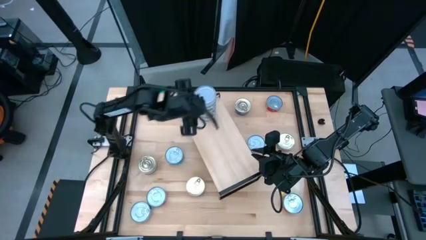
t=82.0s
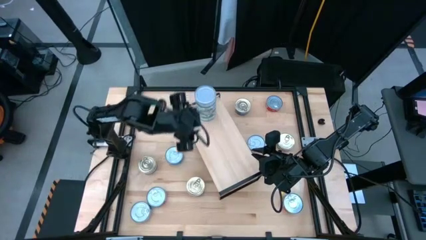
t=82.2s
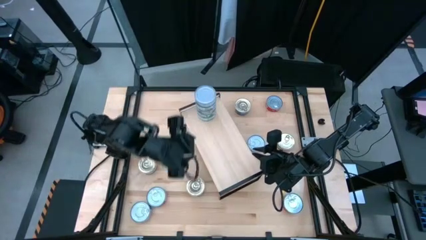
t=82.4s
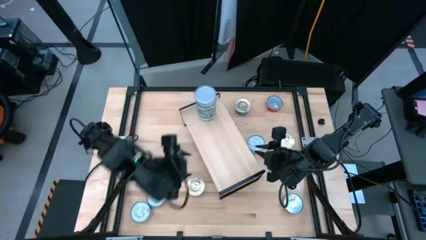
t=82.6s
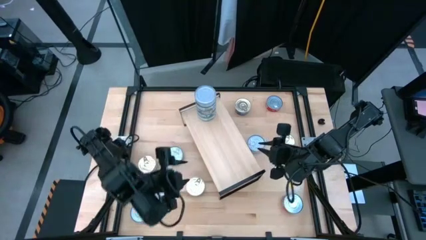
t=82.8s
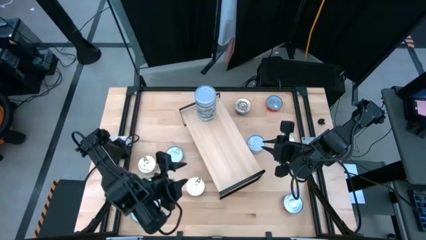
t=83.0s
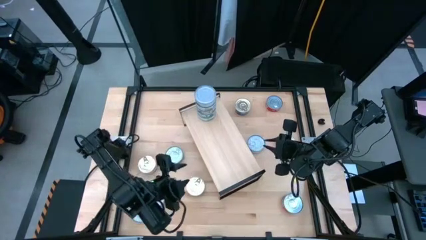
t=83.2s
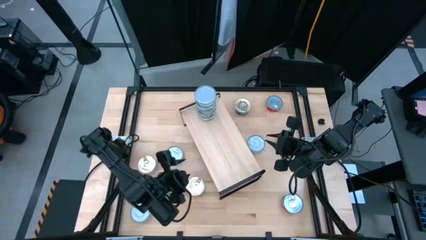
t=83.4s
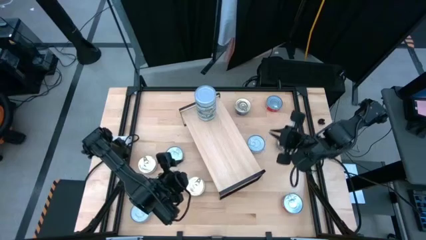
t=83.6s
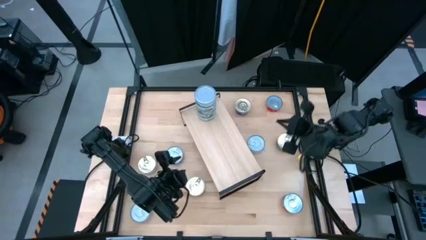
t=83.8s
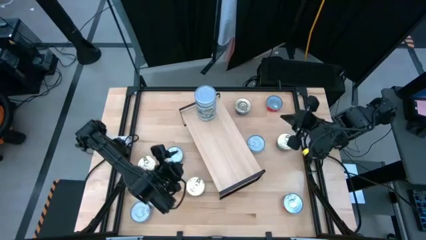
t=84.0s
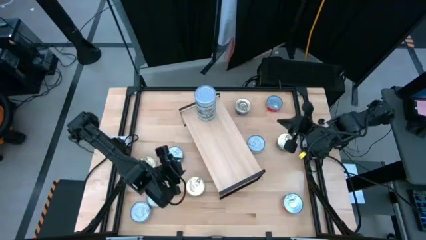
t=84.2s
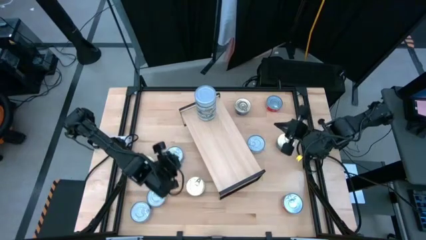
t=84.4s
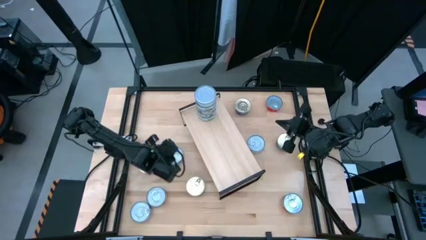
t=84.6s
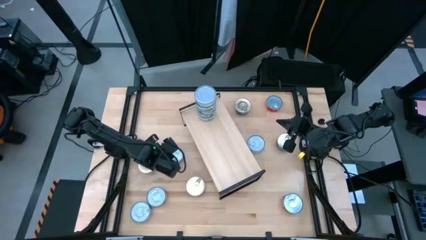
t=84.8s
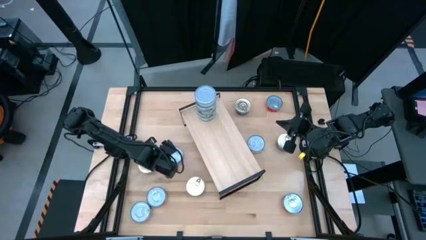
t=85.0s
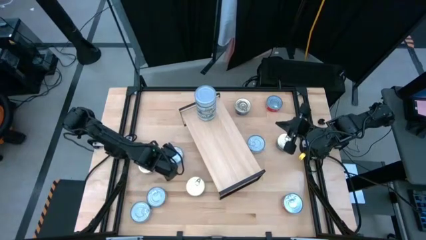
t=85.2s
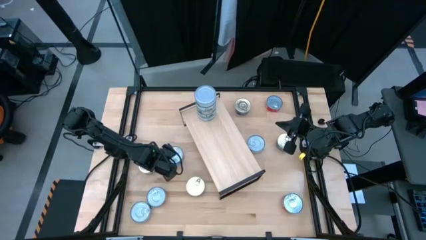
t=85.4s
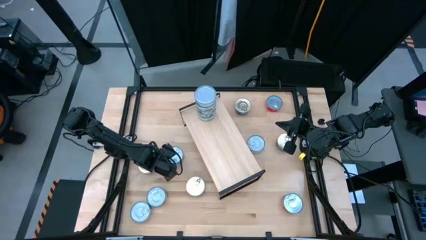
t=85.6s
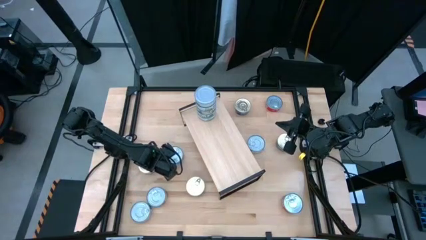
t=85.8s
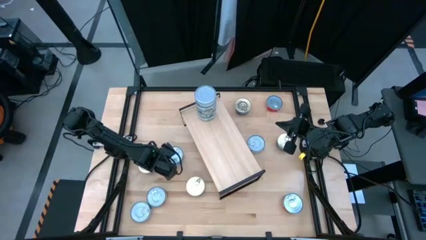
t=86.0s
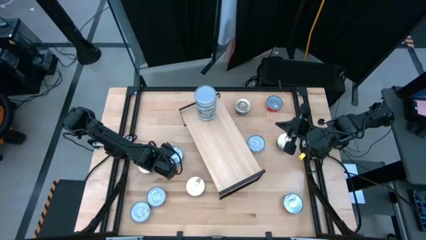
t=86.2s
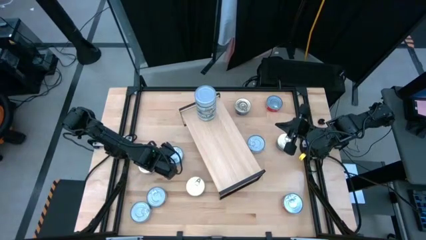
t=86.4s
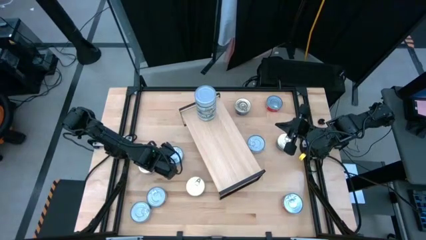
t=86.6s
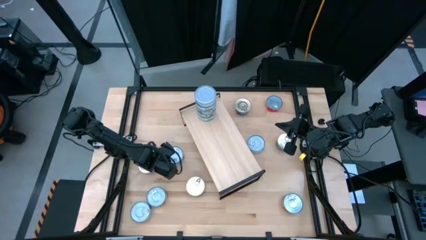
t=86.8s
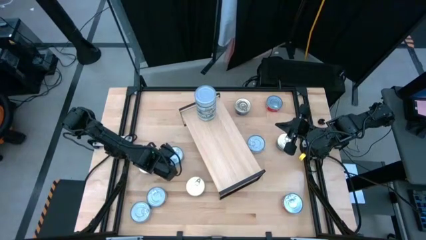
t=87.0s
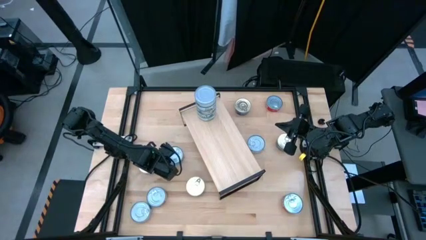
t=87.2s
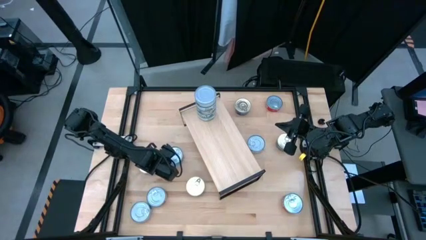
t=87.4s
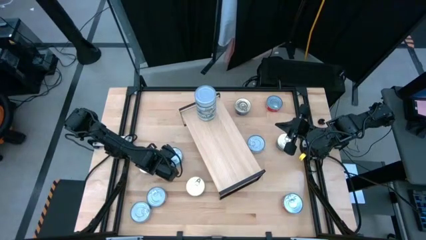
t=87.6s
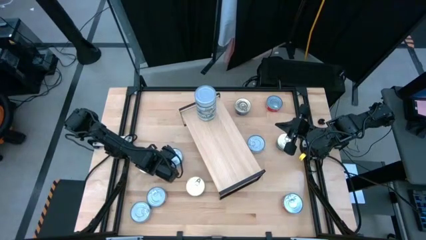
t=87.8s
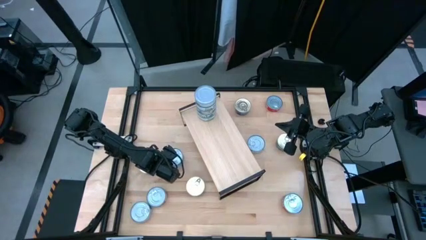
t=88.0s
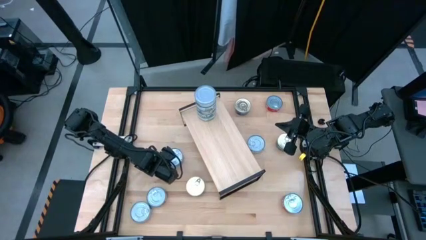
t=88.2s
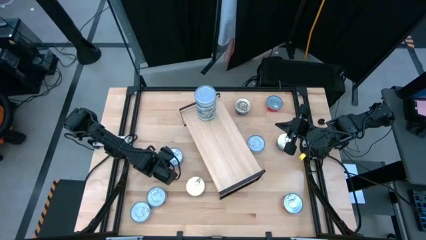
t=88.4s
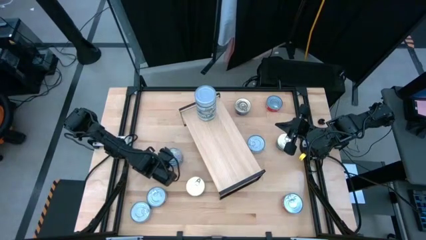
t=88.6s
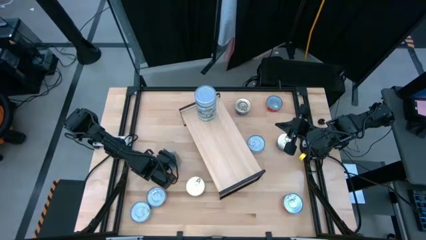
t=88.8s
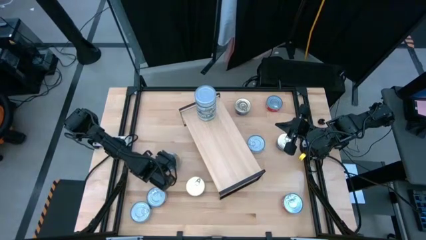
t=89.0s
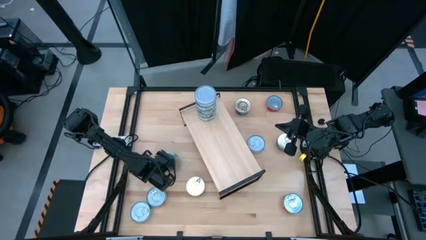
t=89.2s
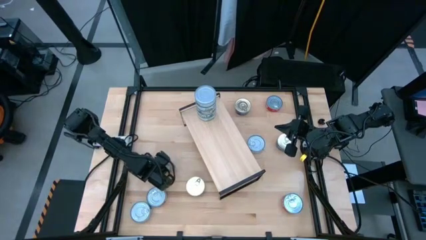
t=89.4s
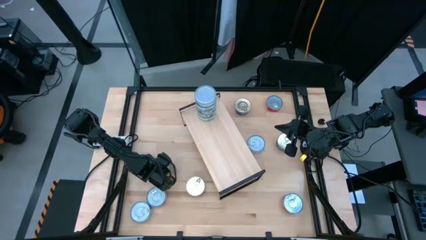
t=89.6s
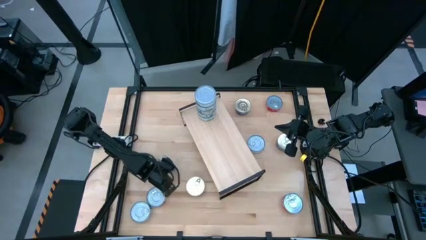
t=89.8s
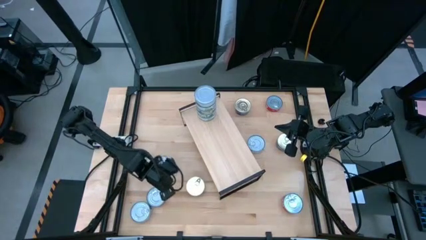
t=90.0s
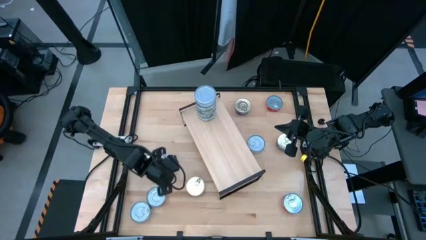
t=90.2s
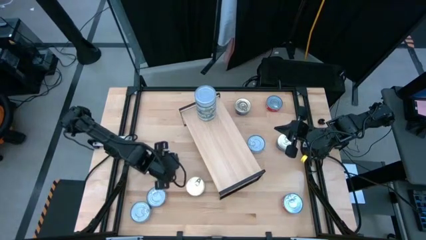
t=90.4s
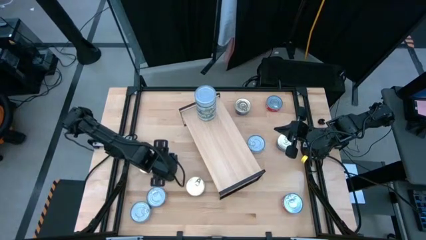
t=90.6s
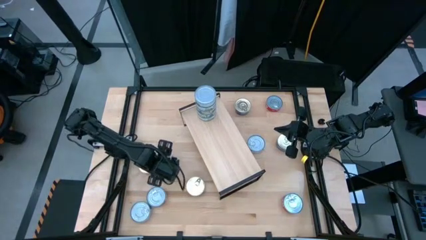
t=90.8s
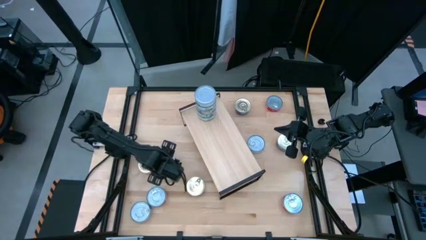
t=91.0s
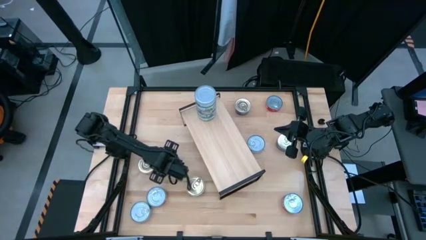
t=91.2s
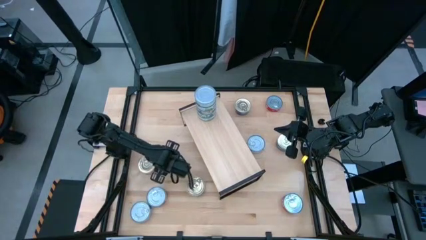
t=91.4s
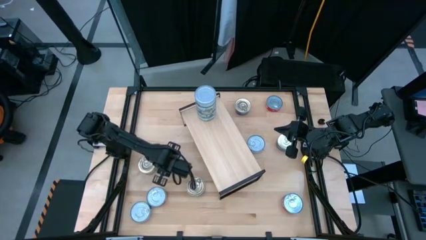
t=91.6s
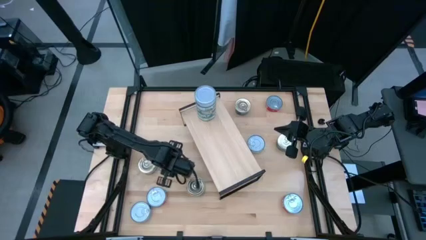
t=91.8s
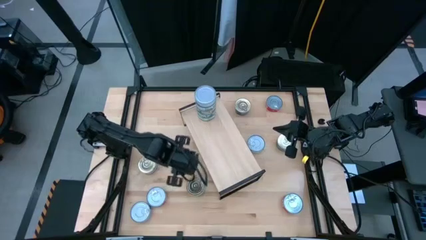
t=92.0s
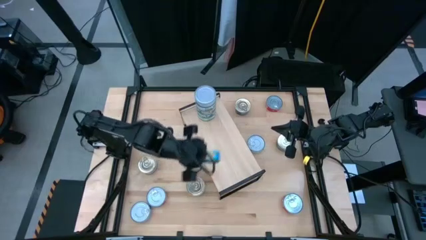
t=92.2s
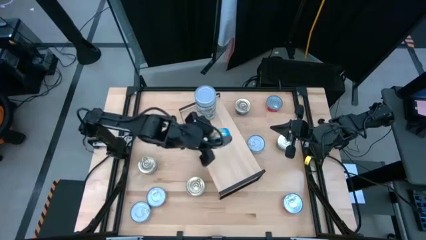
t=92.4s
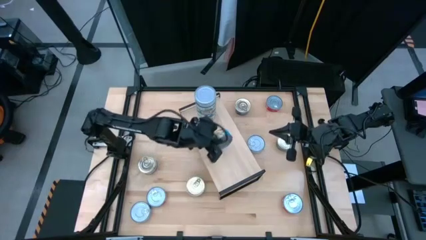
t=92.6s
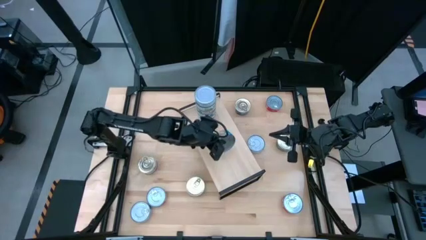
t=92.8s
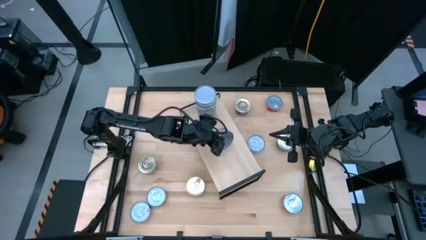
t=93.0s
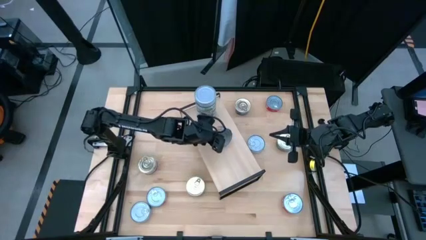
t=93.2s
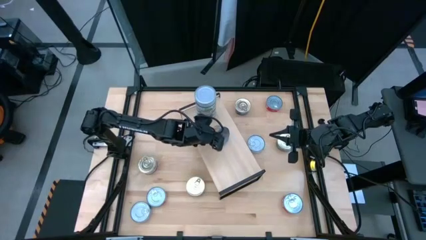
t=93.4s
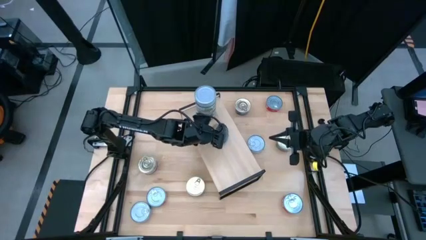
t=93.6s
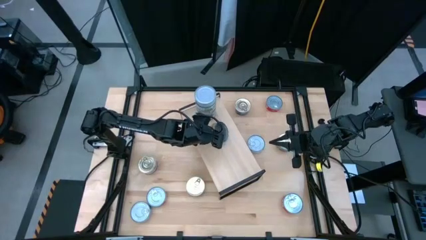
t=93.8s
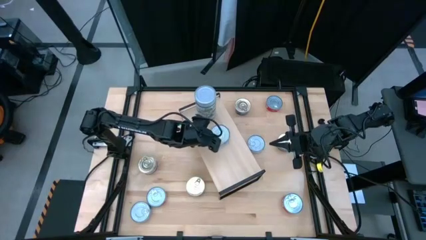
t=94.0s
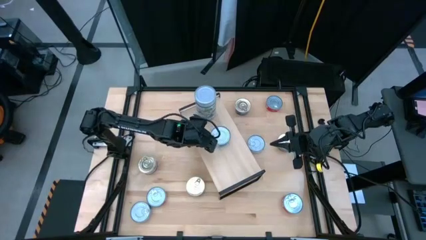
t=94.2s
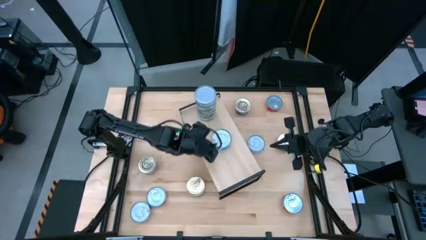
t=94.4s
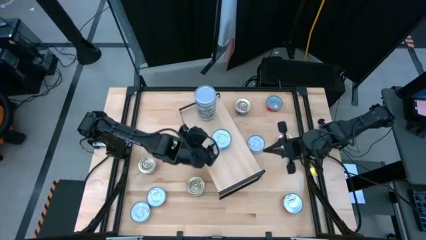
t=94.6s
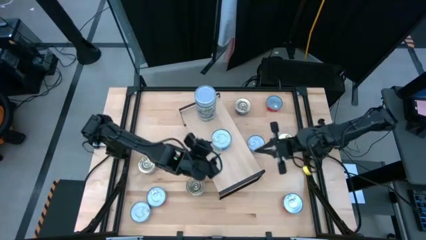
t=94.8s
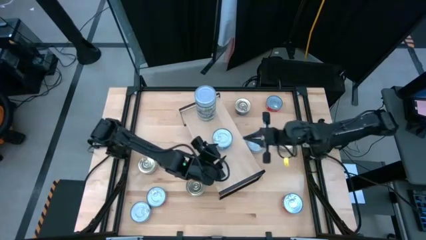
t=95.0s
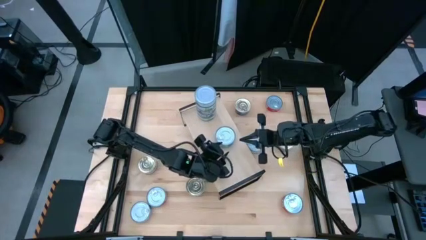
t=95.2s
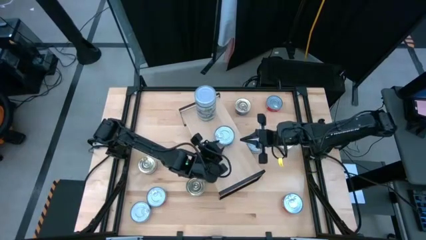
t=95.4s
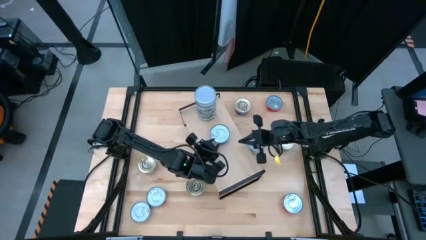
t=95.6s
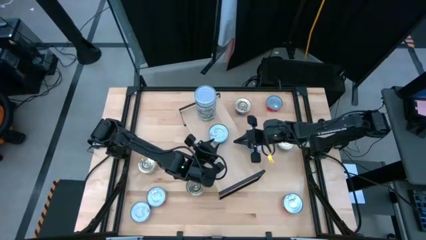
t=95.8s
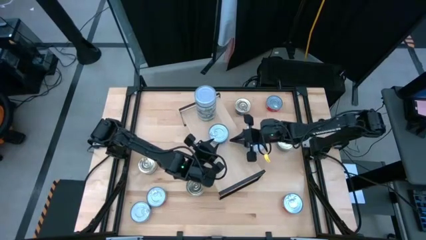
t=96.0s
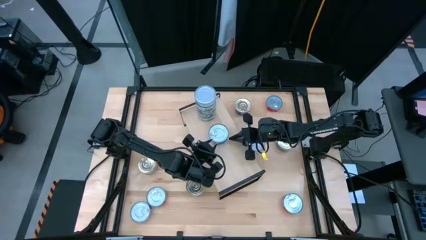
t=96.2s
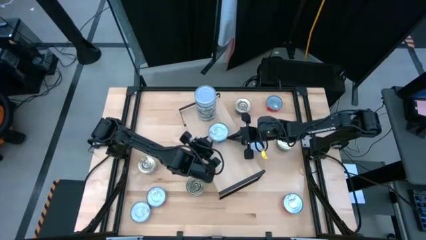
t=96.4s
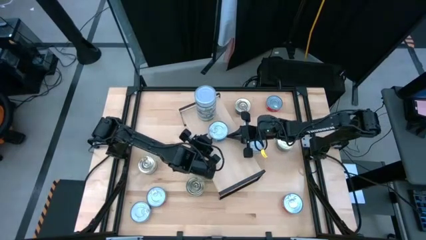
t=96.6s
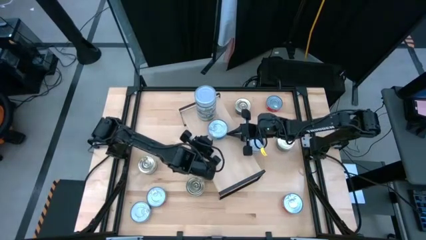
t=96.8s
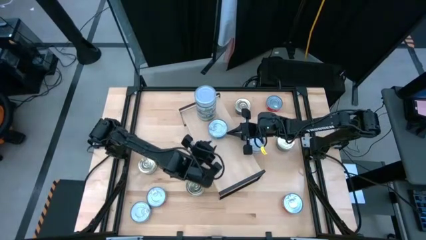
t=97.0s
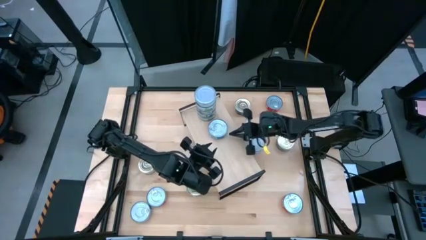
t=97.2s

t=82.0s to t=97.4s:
Task: Stack canned seafood by type on shelf
Put the top left light blue tuna can on the shelf
